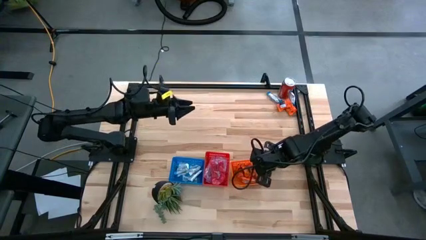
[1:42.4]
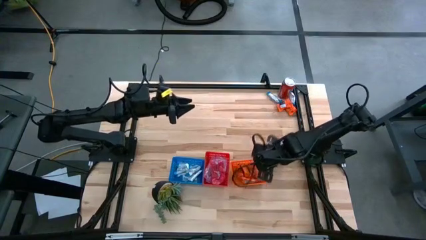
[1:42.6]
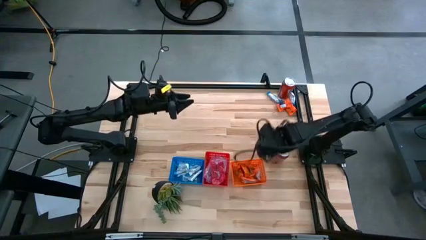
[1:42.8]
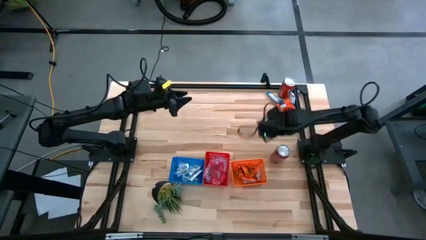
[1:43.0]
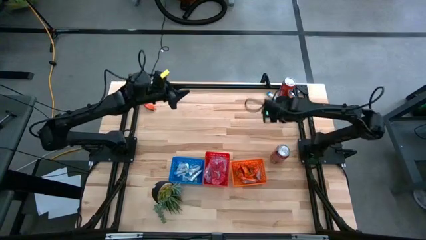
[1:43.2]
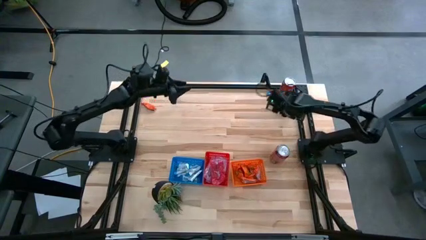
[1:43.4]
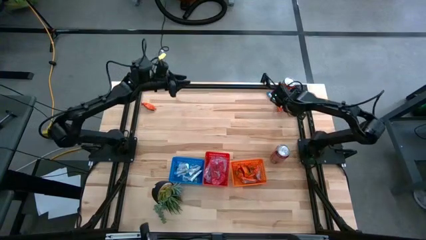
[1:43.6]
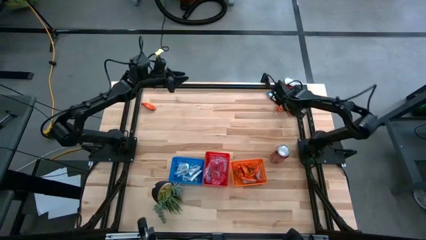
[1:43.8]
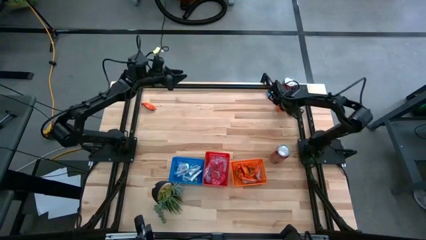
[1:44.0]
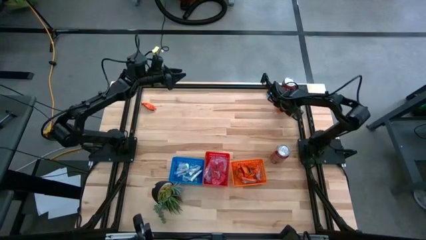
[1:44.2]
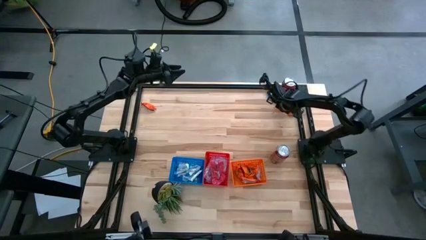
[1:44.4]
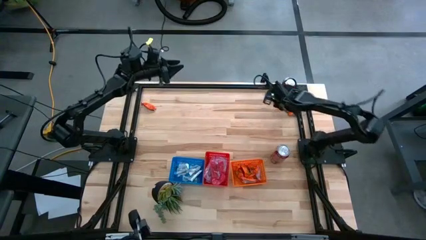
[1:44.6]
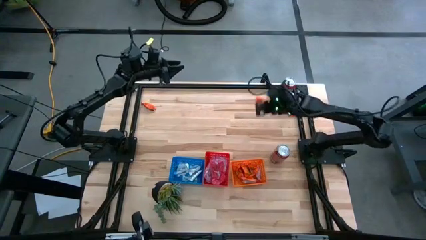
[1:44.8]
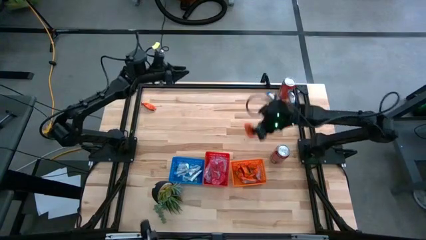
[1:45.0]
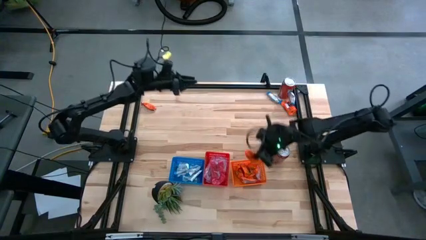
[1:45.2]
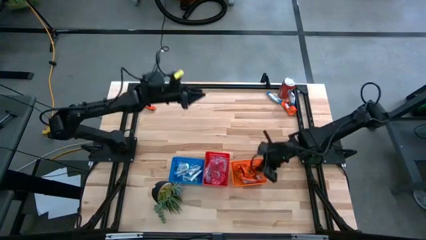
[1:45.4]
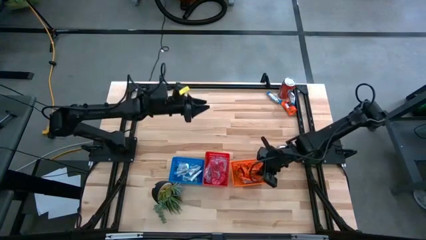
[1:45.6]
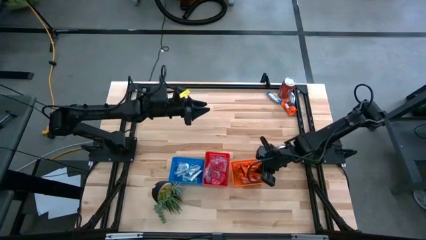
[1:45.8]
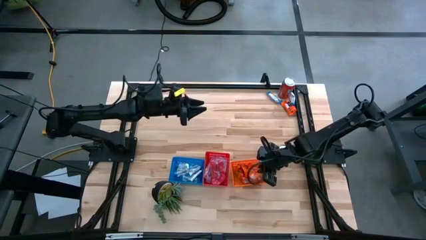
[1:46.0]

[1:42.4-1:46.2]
Task: Sort candy
Put the orange candy pack into the orange bin

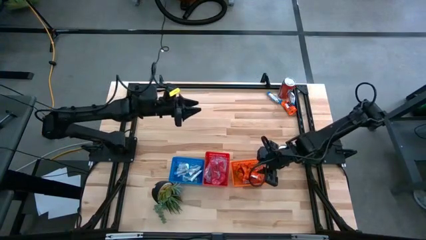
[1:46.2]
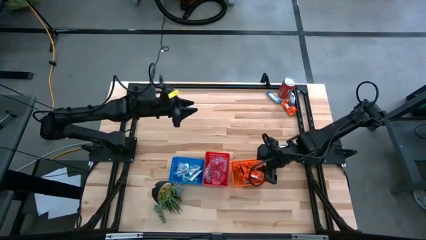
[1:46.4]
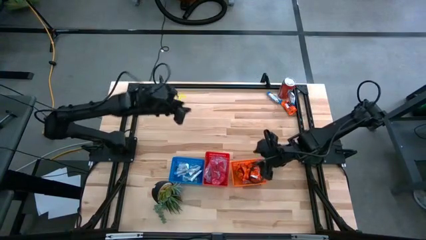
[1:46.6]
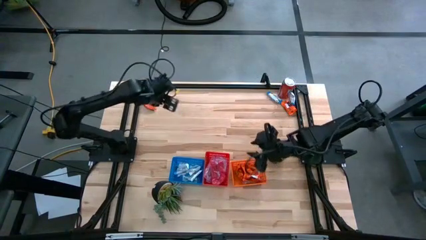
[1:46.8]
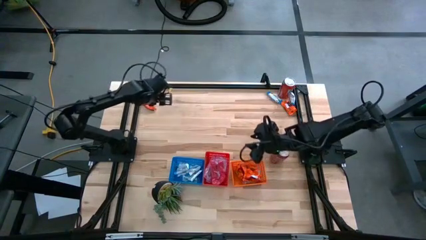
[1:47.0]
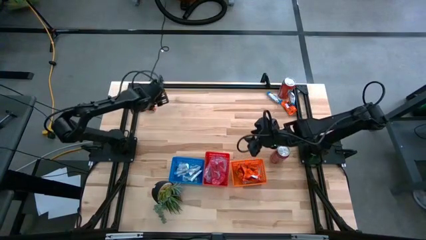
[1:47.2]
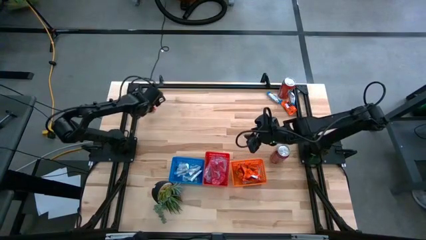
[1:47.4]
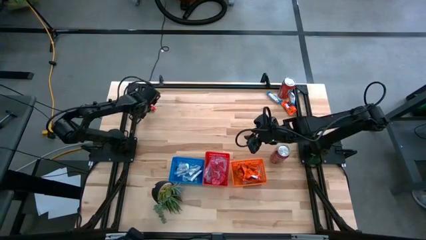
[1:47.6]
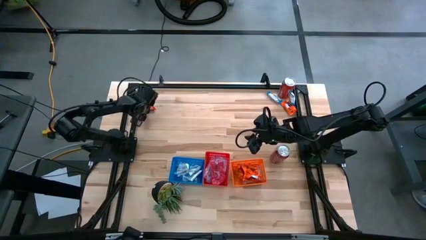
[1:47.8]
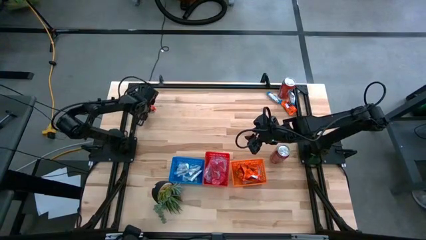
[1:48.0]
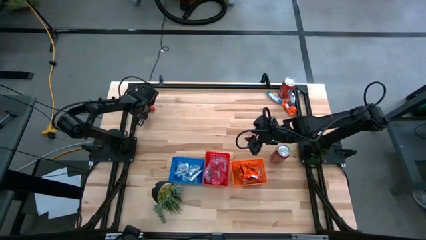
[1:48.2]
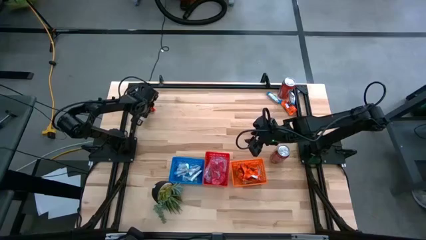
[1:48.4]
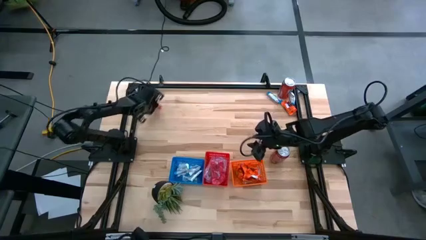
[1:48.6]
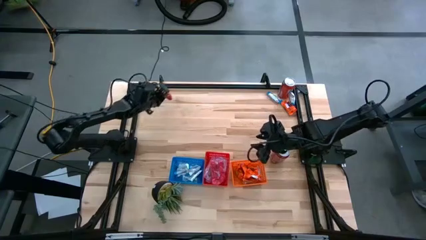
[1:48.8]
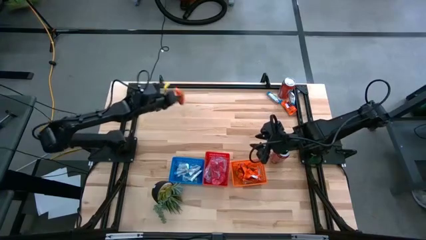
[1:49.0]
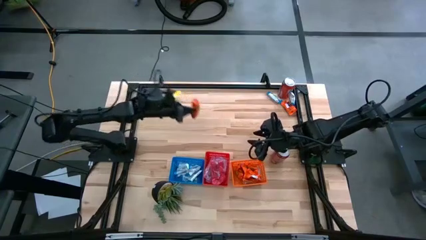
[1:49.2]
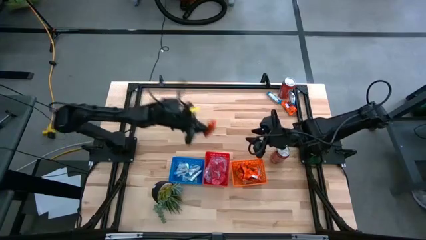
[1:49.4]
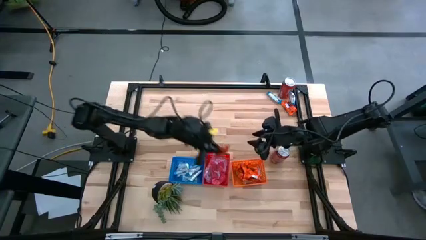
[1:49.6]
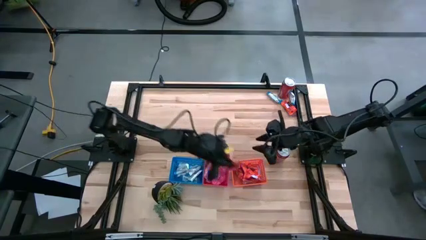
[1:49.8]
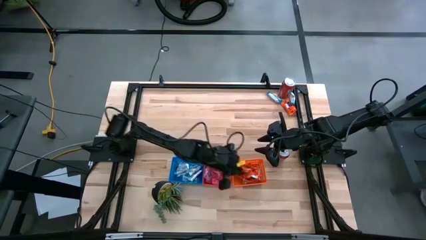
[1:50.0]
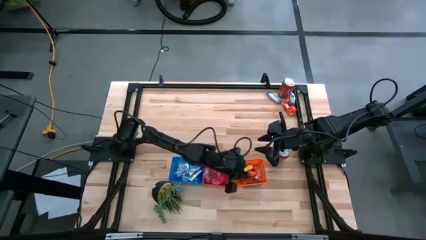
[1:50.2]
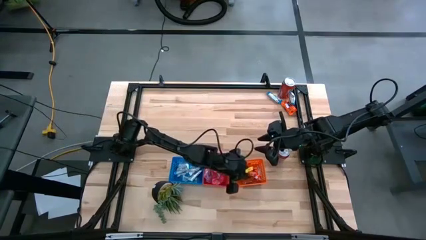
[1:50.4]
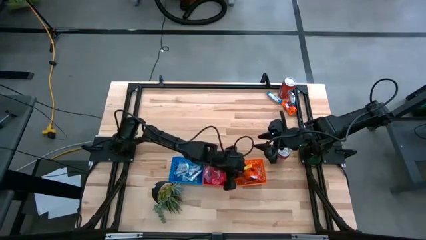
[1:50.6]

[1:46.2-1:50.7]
Put the orange candy pack into the orange bin

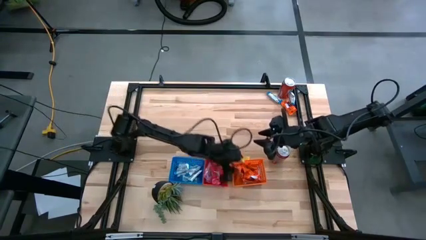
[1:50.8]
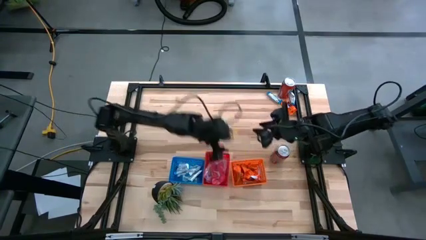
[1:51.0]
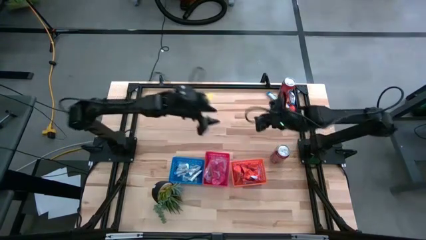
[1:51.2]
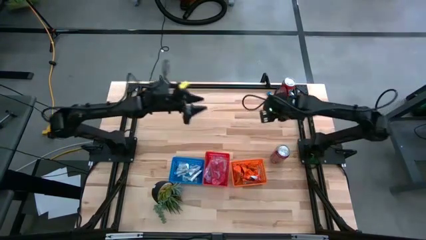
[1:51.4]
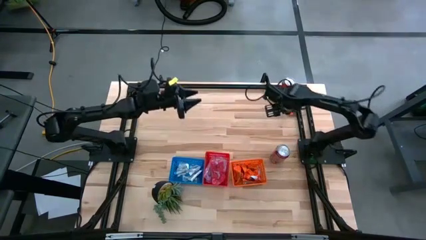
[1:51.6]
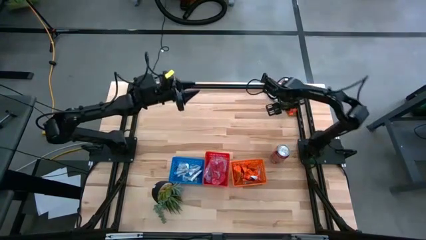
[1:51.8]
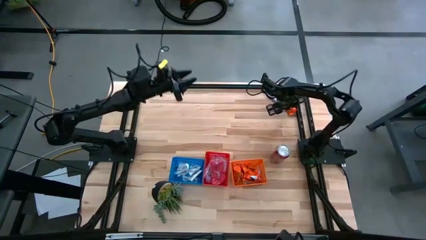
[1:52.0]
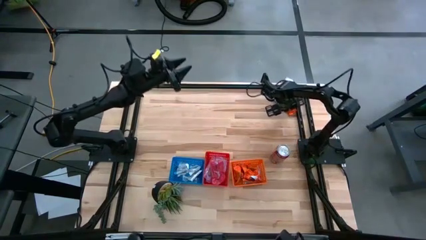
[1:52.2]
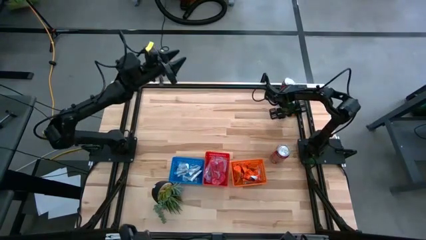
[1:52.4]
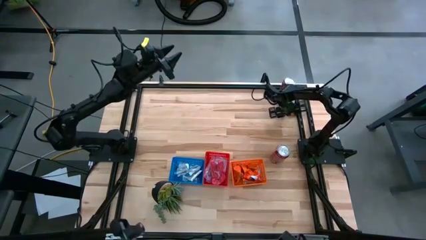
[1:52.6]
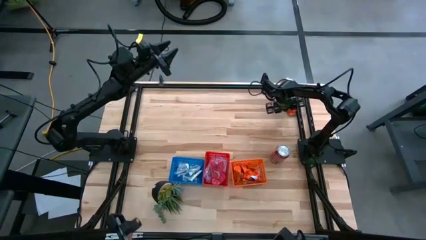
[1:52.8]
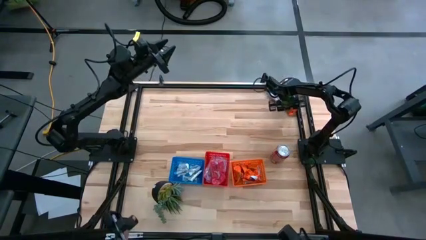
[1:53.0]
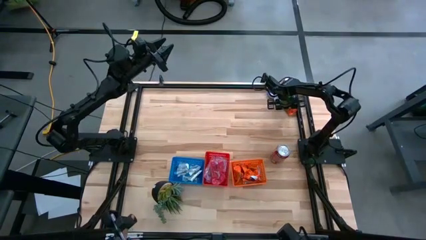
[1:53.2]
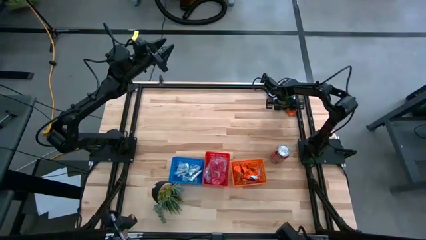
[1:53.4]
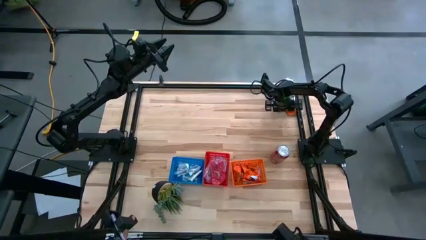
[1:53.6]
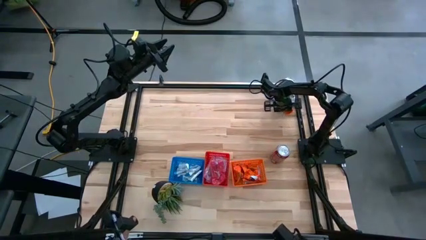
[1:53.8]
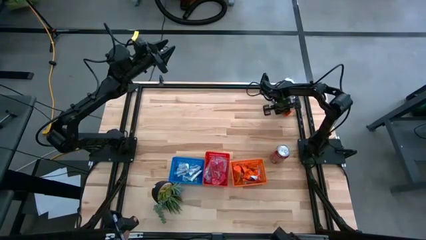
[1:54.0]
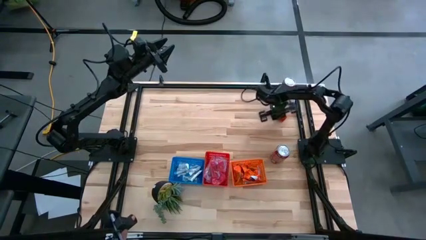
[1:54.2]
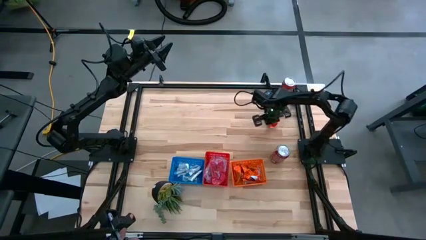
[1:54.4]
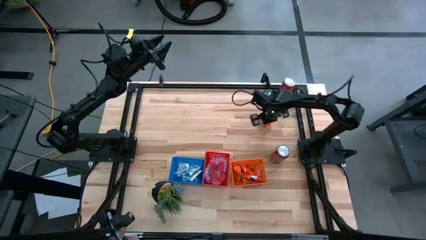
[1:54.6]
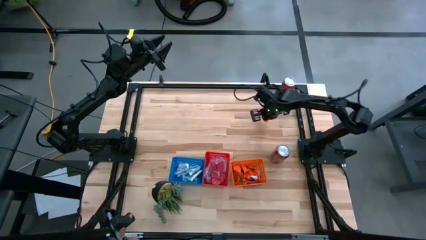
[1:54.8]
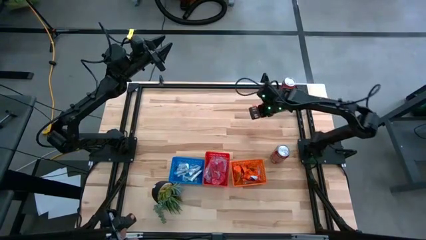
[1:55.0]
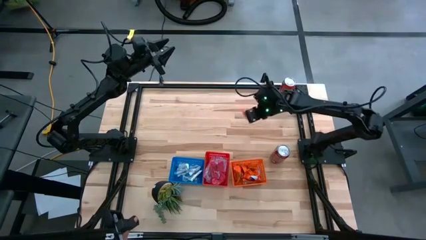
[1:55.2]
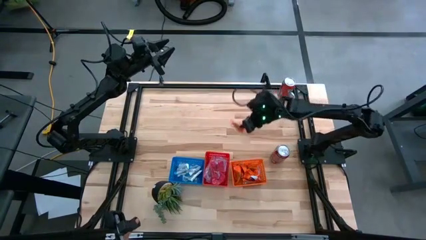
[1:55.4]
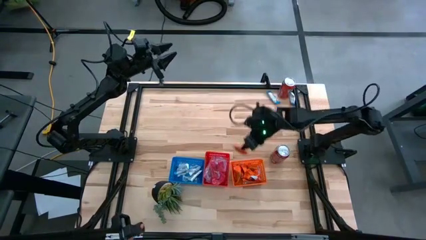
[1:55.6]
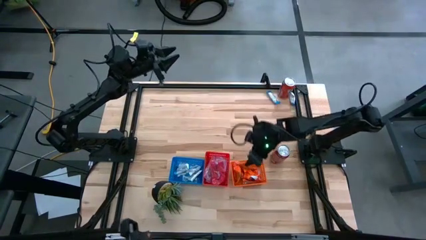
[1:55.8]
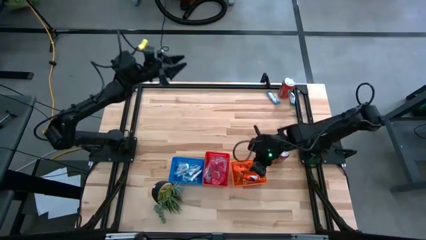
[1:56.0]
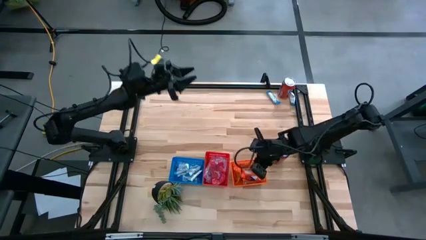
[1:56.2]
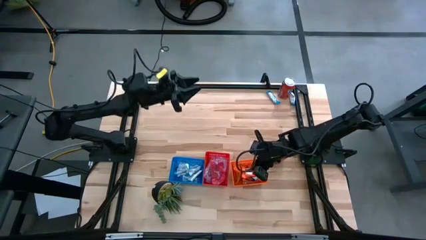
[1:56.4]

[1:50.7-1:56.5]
Put the orange candy pack into the orange bin

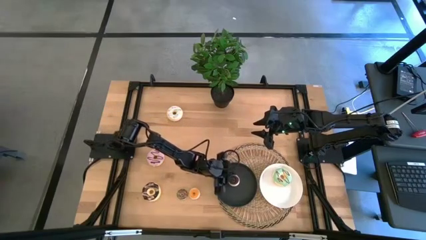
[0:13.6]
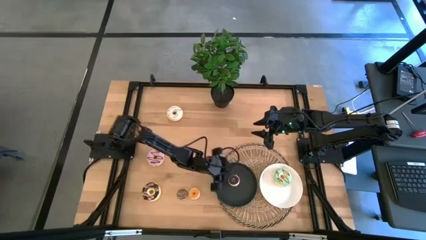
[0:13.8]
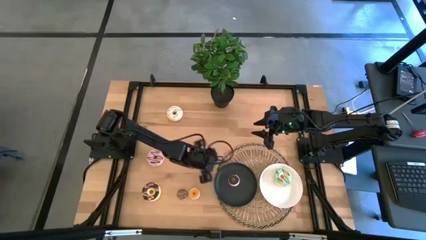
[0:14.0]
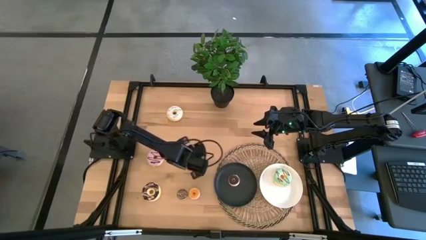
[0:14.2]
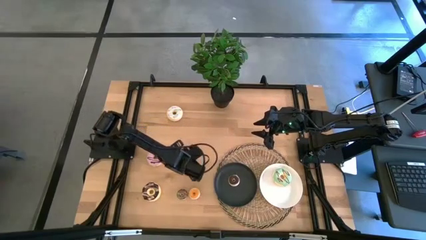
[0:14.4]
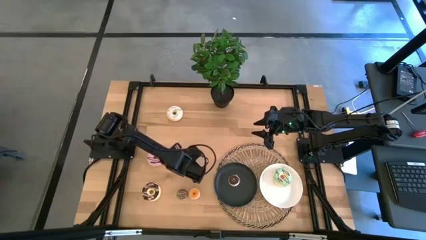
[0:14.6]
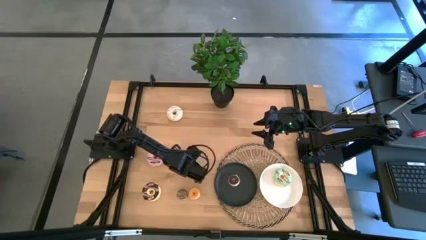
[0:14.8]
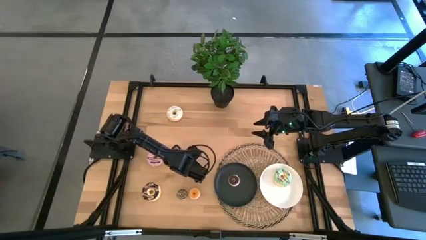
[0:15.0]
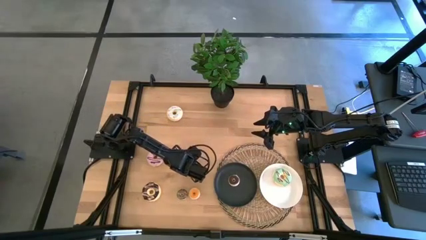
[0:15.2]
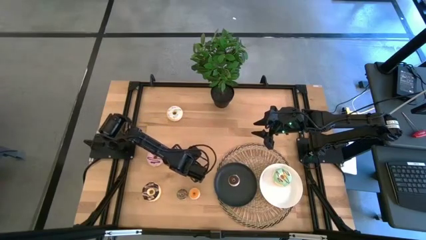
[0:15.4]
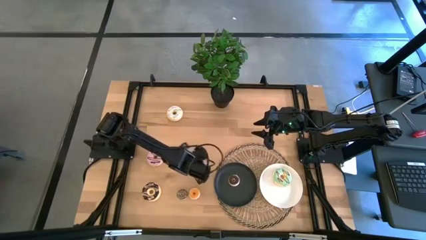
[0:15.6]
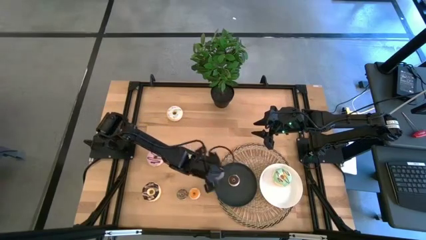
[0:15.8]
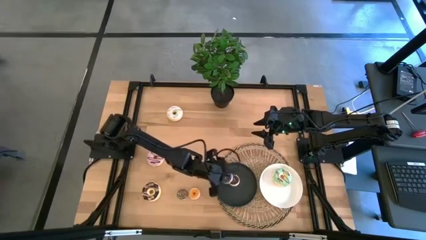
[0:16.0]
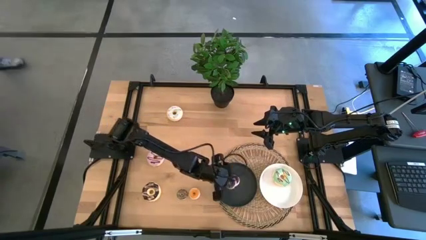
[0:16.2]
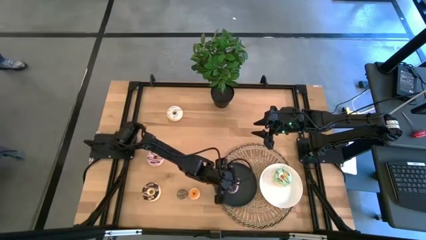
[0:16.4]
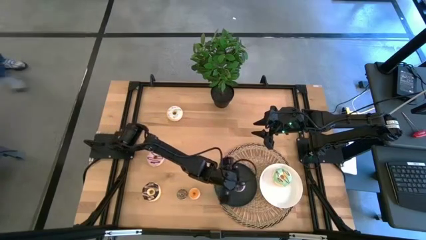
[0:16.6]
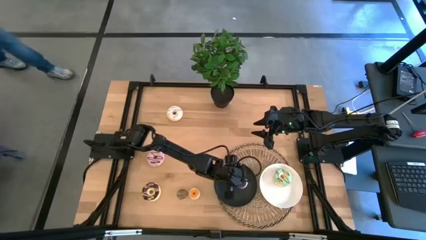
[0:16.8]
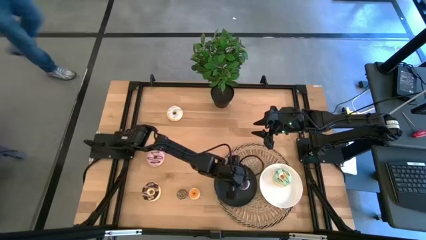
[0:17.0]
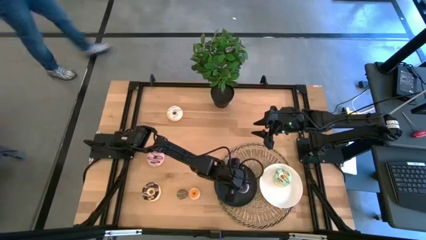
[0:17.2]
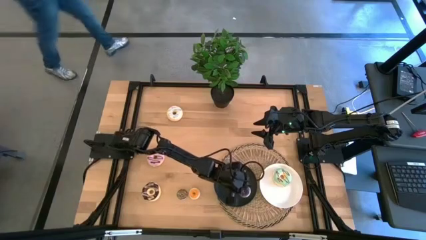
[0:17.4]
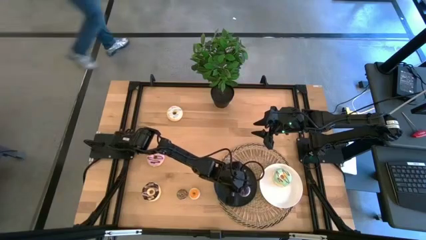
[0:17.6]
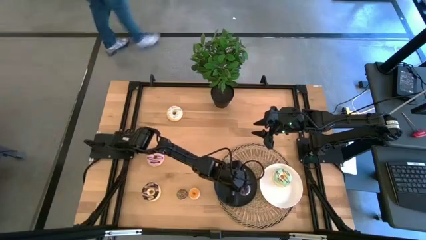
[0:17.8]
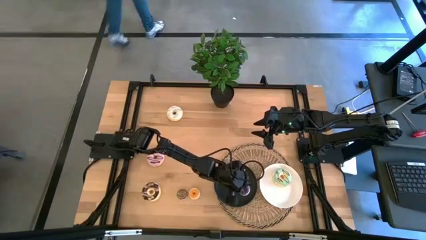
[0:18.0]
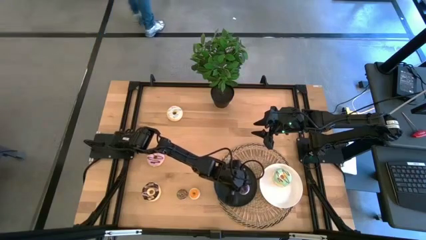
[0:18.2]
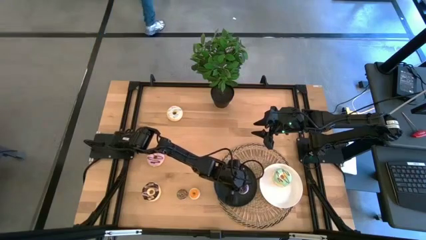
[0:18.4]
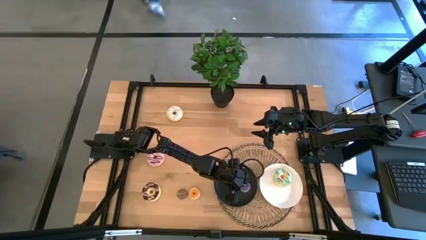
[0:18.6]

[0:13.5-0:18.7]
Task: Pick & Place donuts
Put the small blue donut on the black plate
